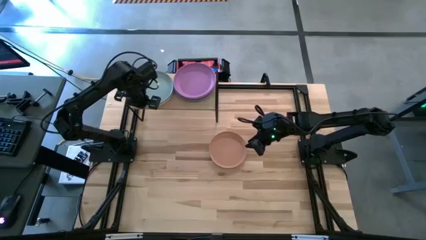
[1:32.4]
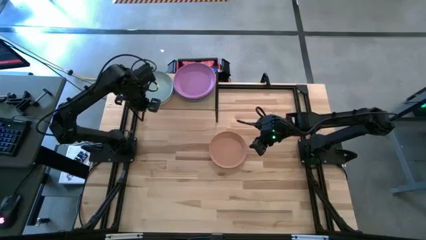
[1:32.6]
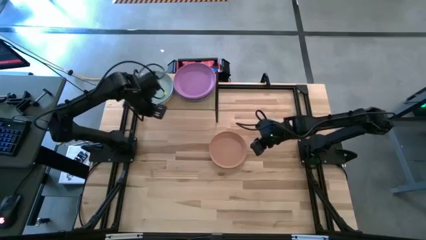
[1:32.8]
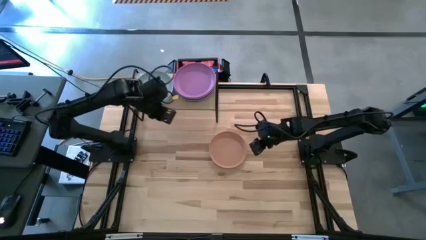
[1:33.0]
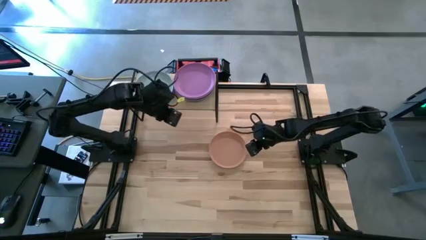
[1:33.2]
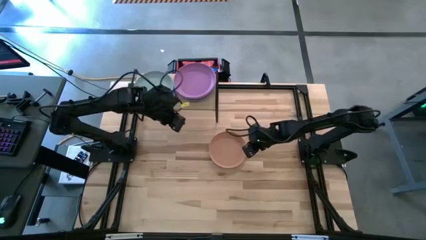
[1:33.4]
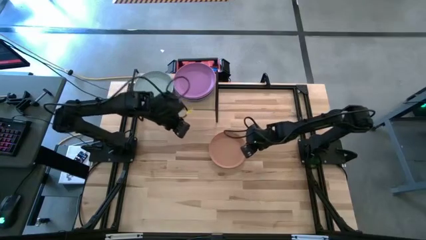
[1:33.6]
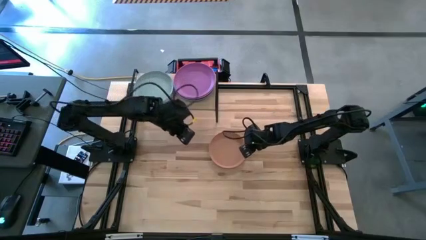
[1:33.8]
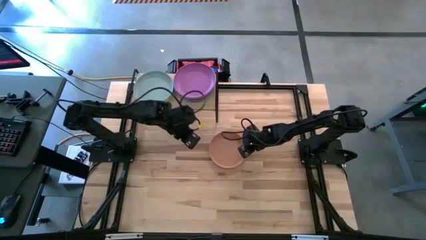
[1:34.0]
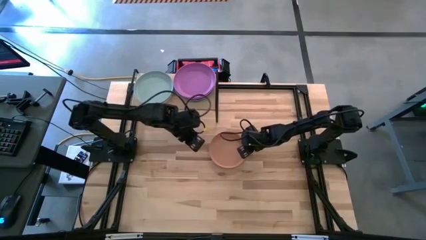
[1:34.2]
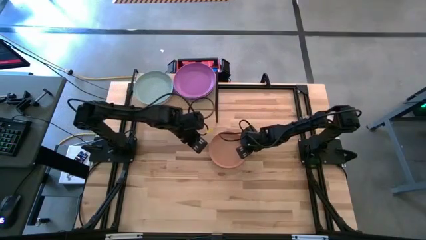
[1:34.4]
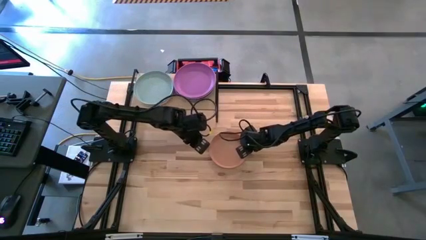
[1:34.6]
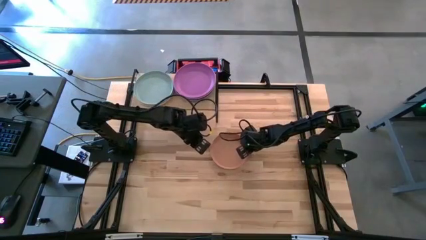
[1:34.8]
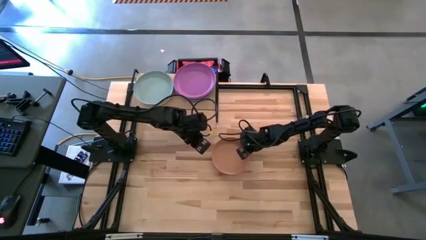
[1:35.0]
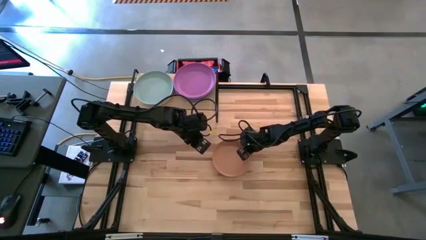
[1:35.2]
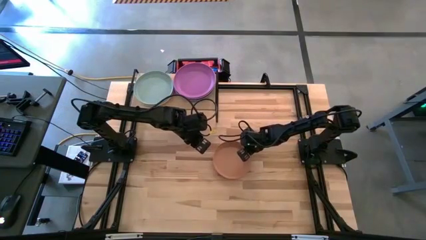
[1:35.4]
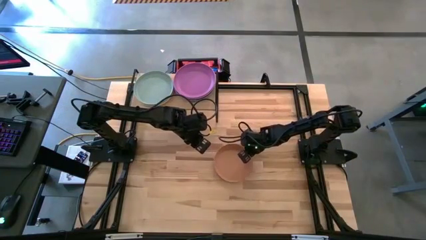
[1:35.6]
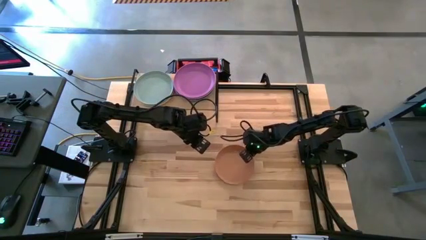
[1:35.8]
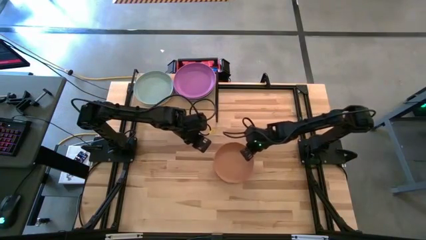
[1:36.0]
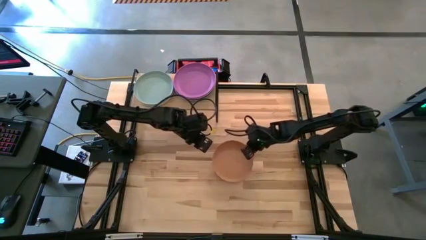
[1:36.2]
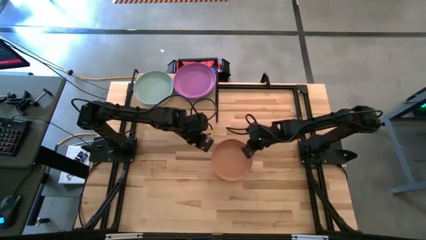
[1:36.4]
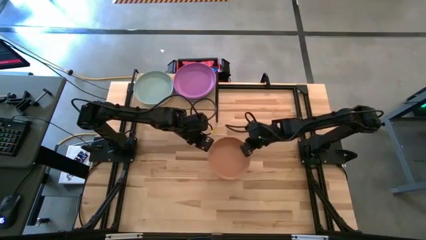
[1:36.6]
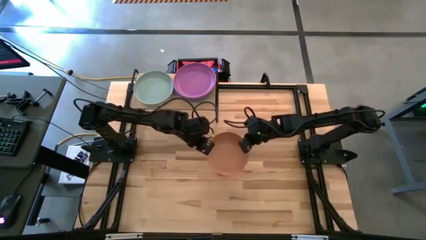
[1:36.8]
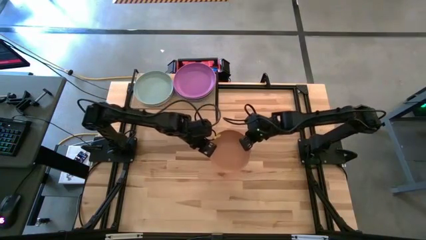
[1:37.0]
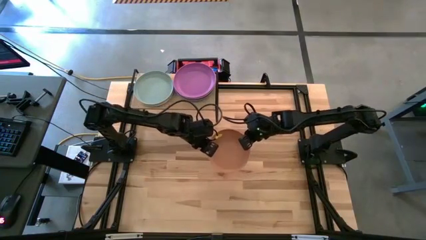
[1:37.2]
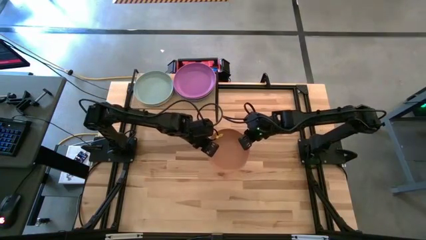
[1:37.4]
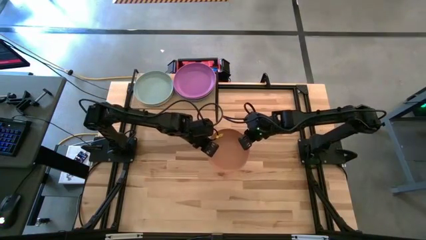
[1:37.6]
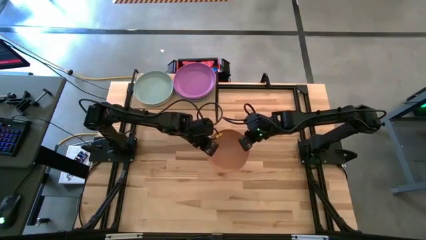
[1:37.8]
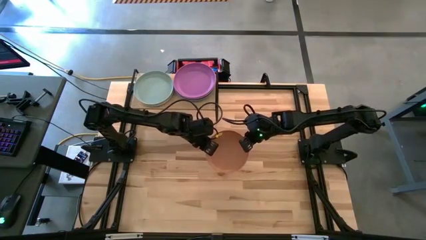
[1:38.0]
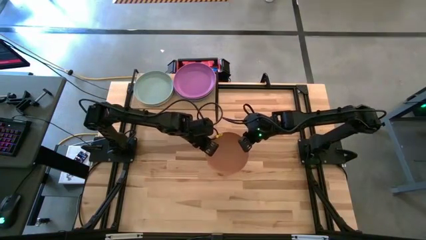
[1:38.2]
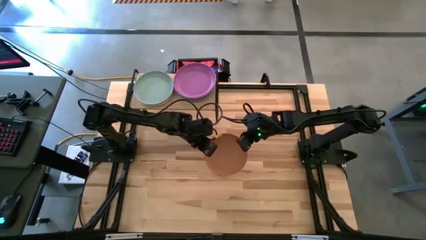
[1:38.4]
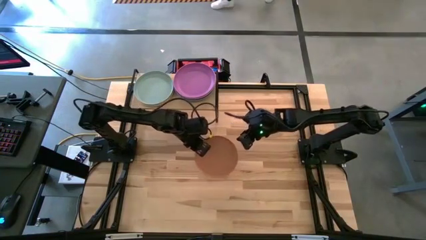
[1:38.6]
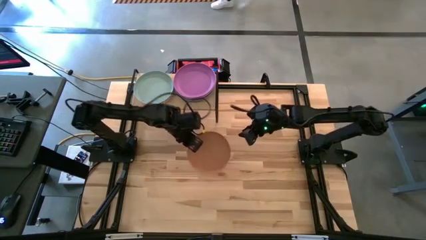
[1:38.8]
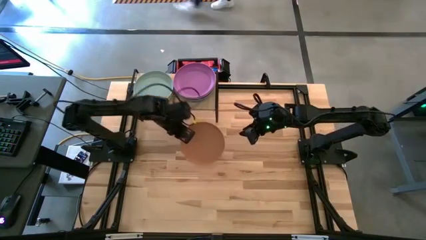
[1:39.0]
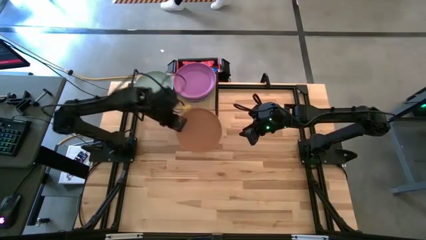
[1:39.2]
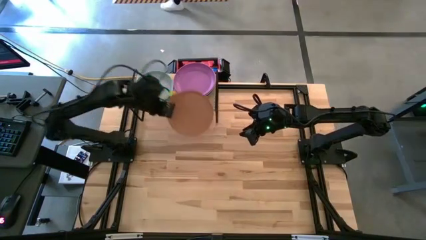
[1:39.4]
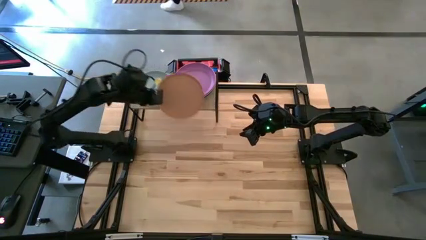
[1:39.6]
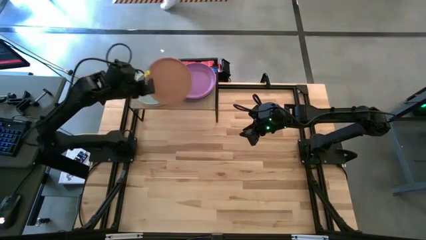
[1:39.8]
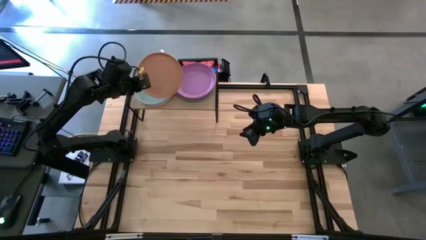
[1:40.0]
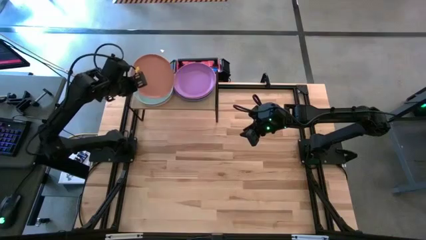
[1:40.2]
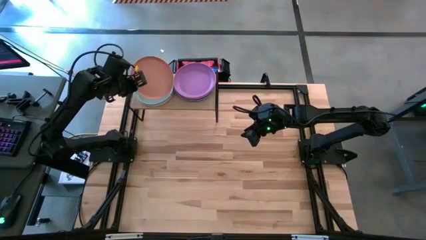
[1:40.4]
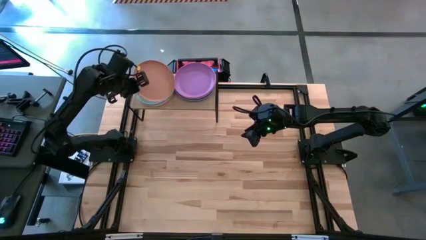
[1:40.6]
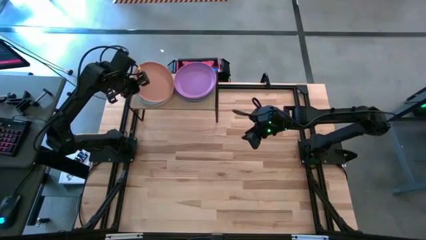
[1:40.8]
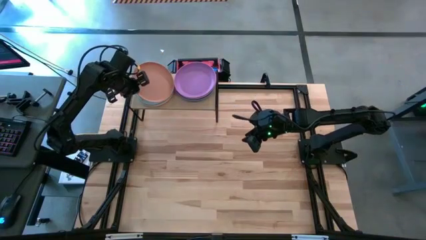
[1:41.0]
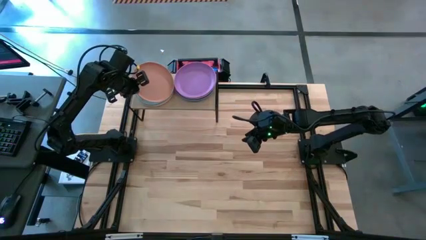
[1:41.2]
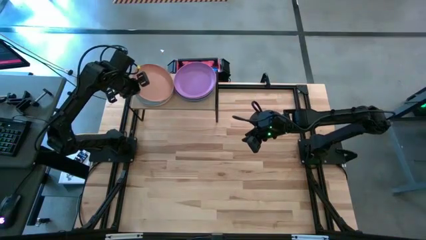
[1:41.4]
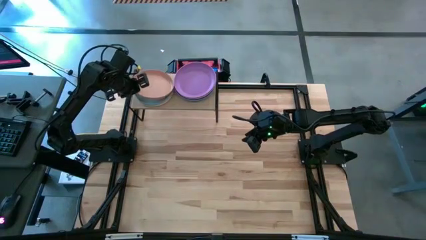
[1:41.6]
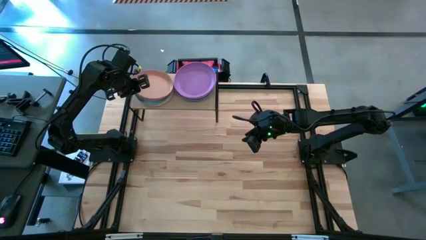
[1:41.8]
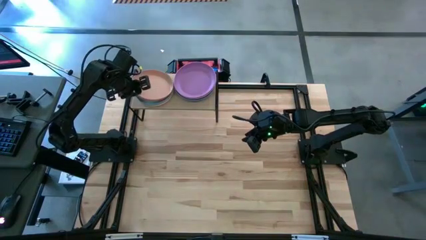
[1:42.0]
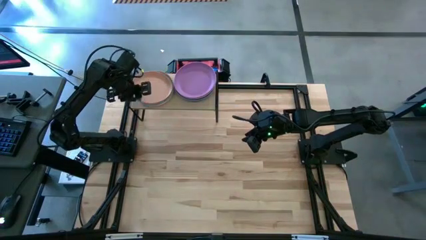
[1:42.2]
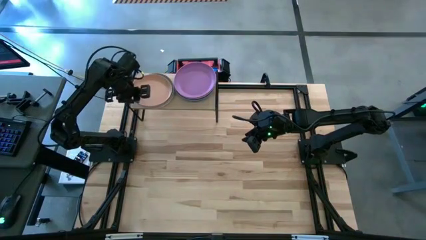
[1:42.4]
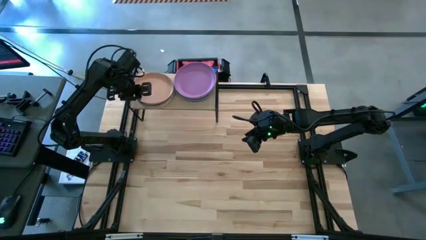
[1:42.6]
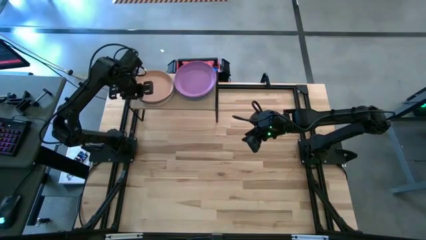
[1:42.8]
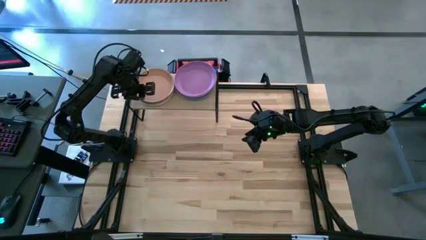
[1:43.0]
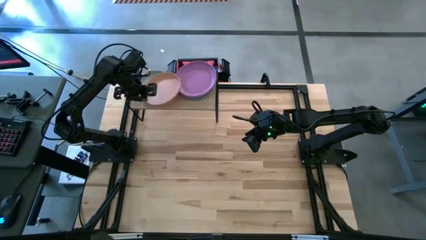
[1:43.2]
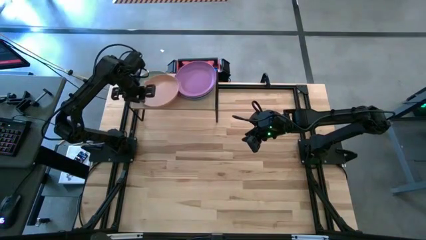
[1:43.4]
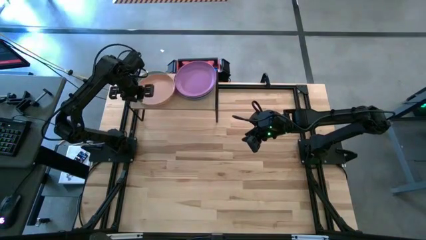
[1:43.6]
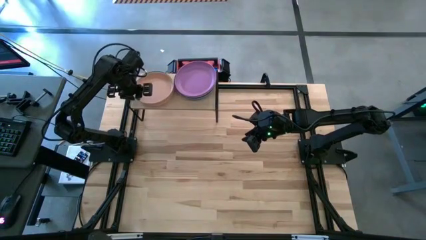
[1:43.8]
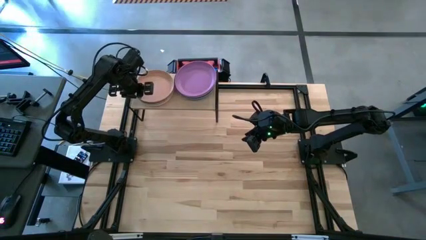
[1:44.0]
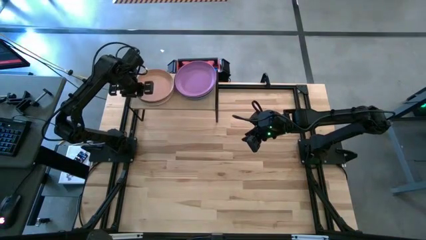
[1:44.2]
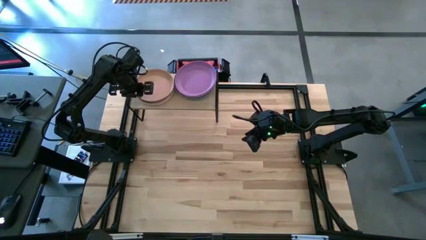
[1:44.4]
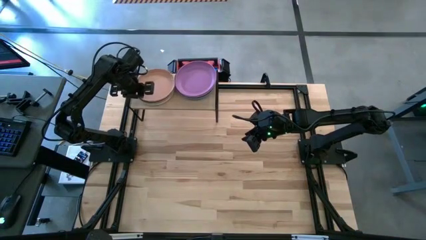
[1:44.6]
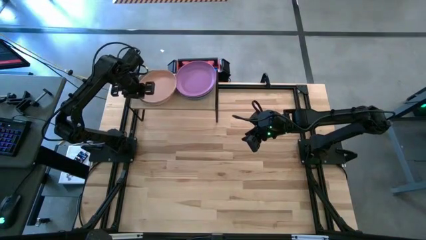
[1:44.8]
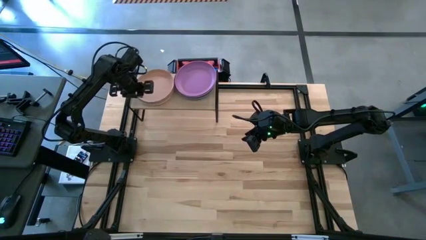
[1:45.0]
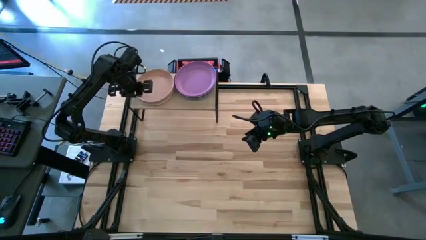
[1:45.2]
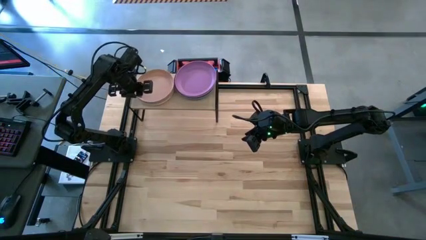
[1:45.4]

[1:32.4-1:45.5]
Task: Place and stack plates onto a shelf
Stack the brown plate on top of the gray plate on the shelf

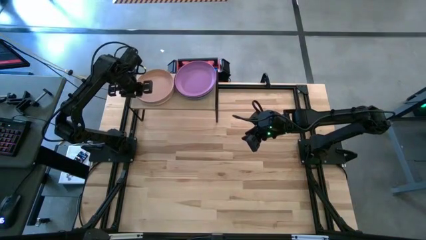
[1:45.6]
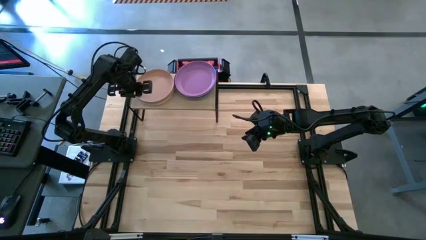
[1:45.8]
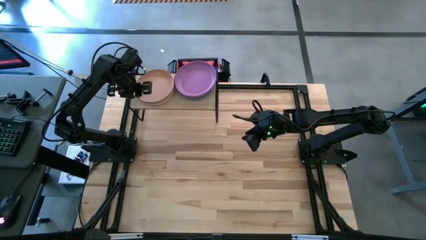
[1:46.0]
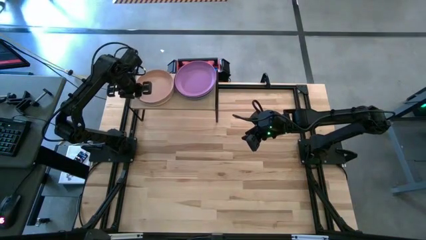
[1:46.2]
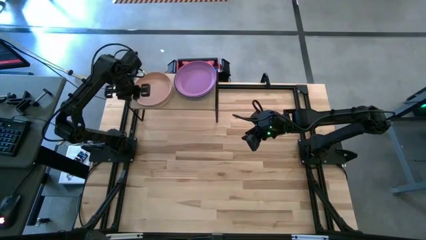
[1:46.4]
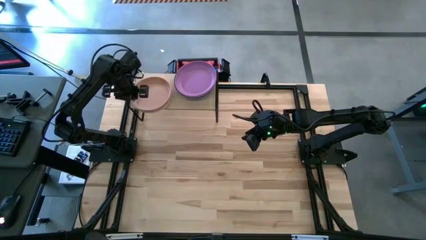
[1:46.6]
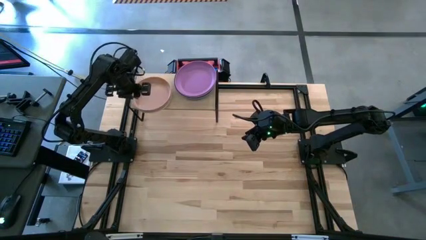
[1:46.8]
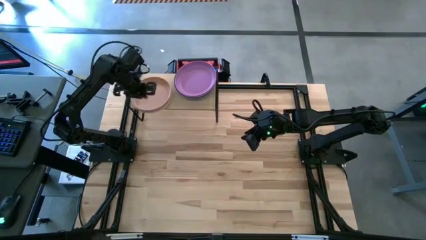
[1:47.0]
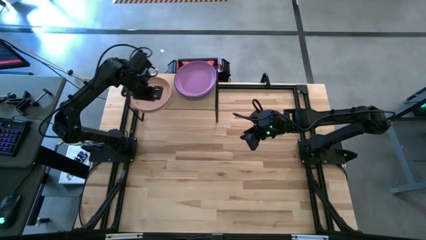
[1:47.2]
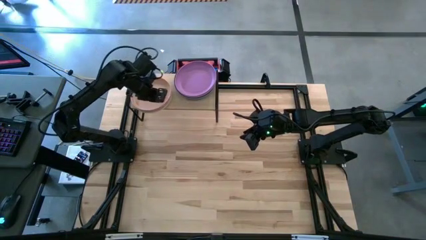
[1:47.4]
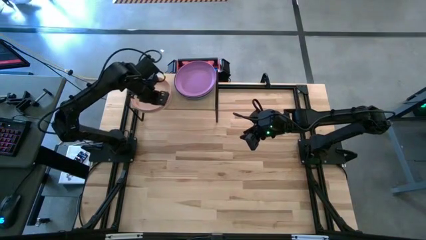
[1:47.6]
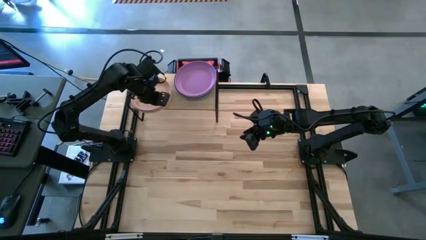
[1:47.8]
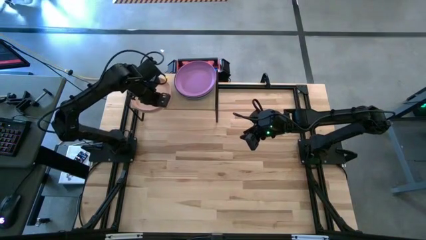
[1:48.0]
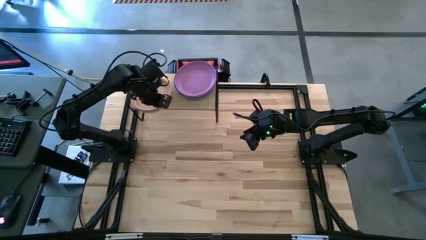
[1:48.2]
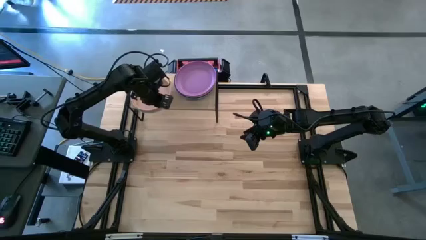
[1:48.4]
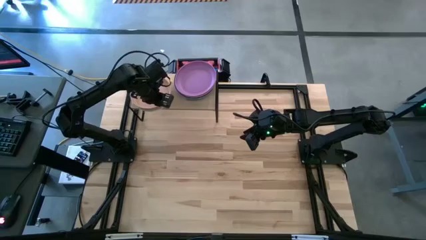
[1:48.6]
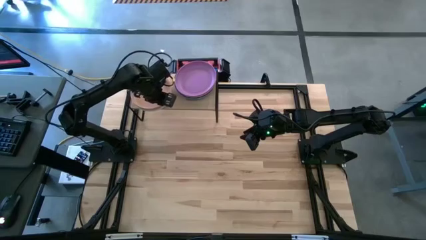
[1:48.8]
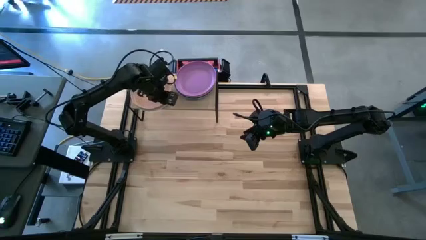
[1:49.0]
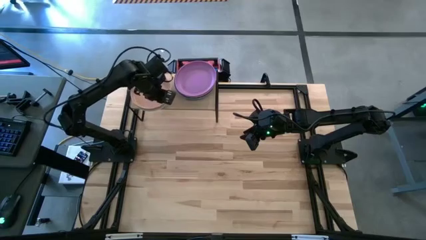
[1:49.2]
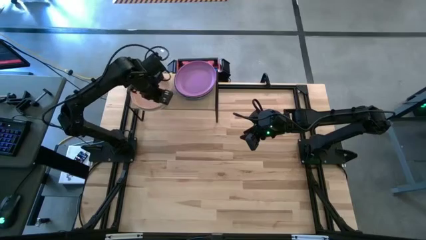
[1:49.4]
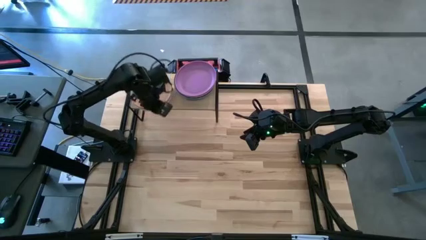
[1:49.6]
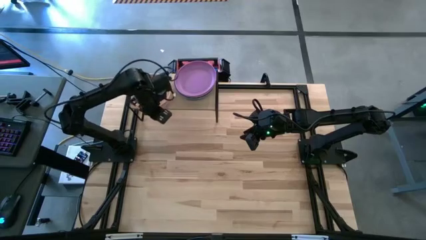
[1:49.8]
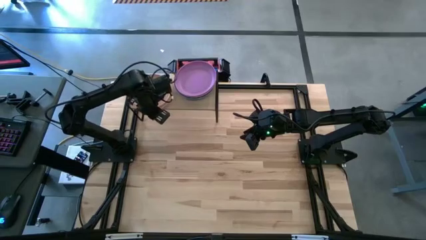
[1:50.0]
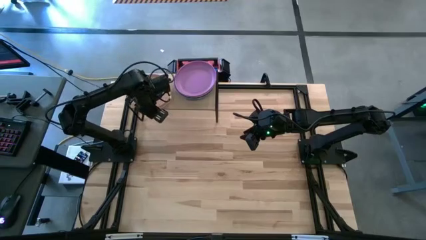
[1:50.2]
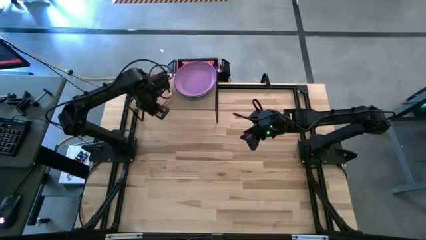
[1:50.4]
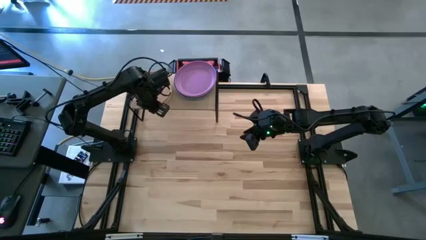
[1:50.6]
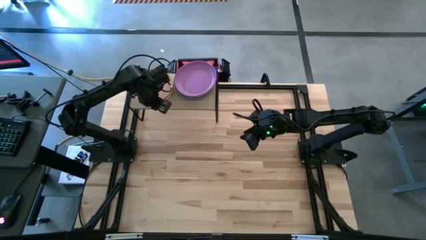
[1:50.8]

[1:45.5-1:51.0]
Adjust the left stack of plates on the shelf
